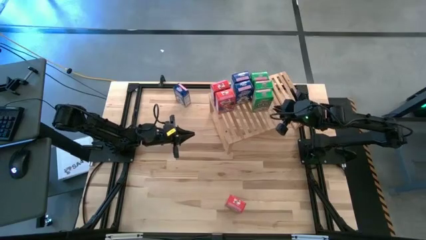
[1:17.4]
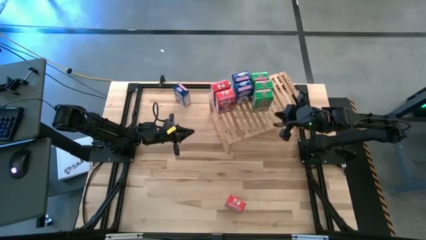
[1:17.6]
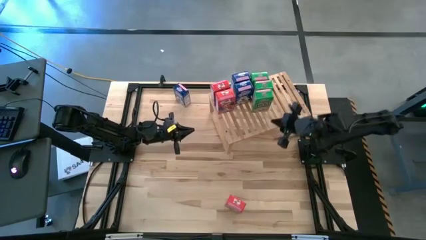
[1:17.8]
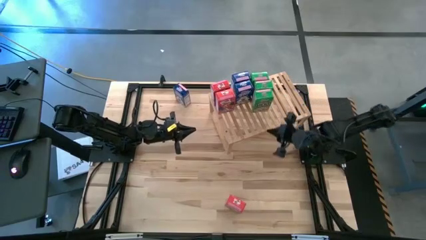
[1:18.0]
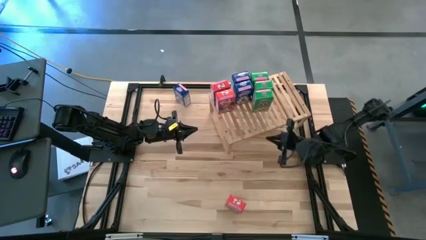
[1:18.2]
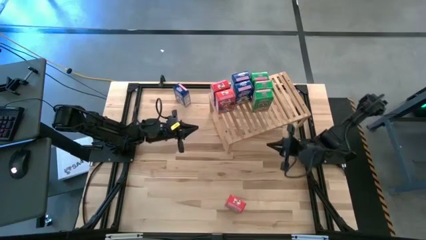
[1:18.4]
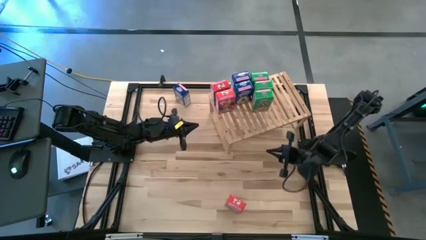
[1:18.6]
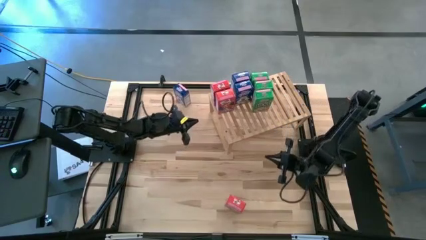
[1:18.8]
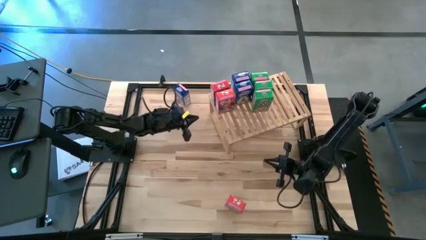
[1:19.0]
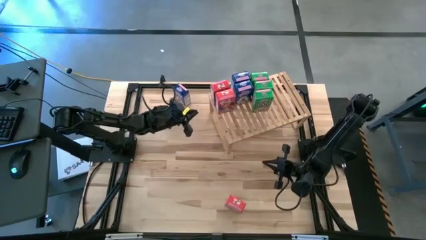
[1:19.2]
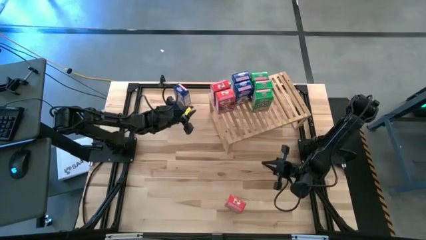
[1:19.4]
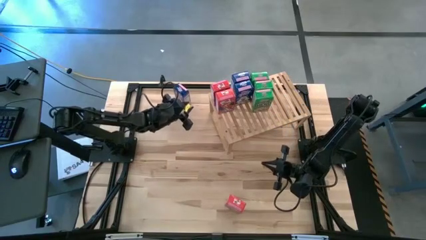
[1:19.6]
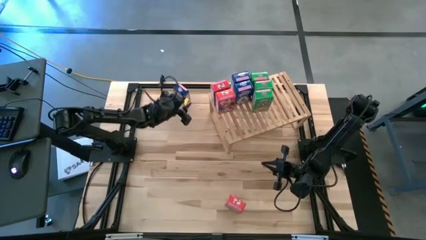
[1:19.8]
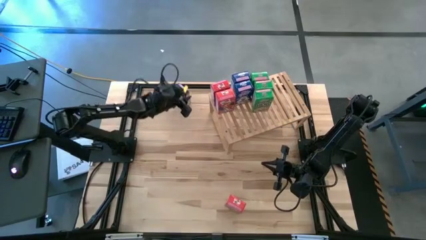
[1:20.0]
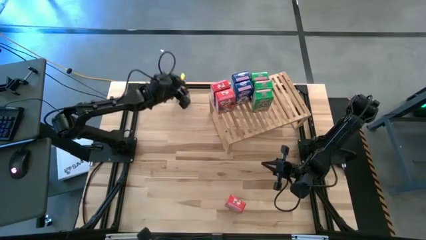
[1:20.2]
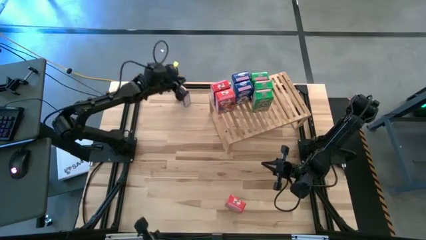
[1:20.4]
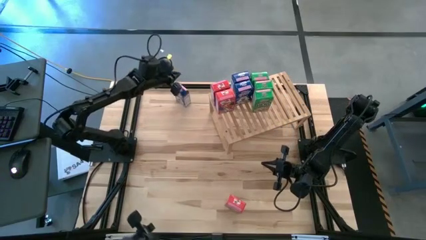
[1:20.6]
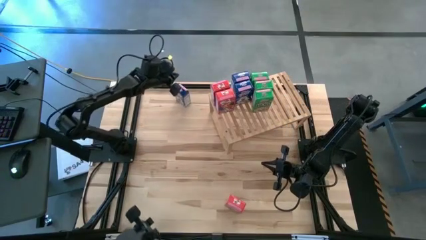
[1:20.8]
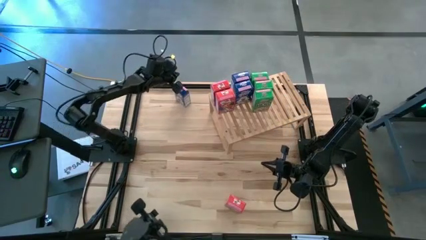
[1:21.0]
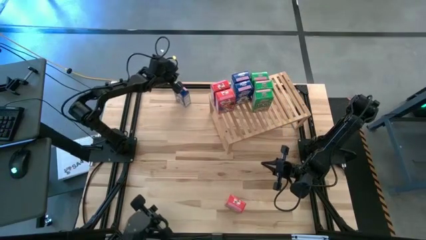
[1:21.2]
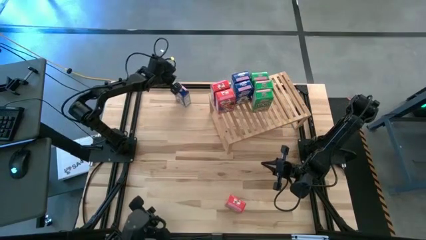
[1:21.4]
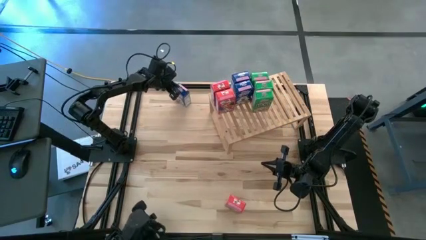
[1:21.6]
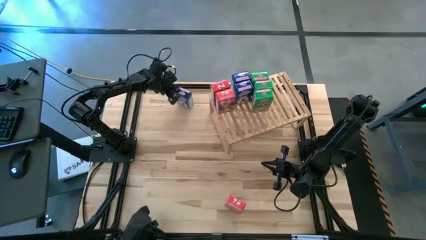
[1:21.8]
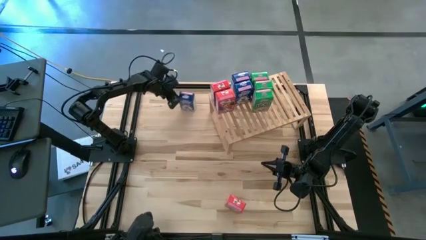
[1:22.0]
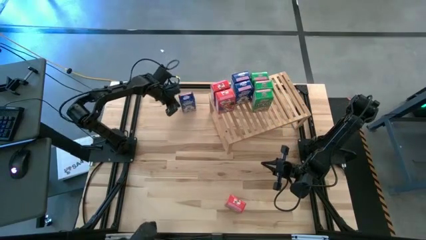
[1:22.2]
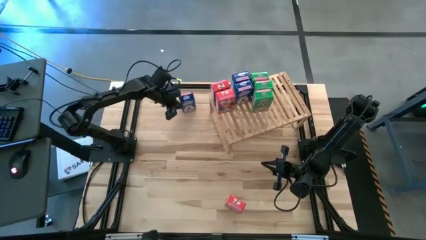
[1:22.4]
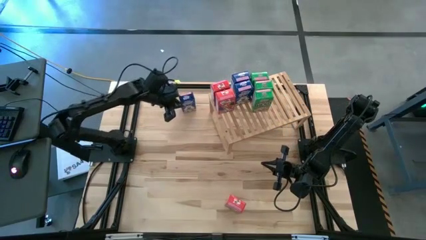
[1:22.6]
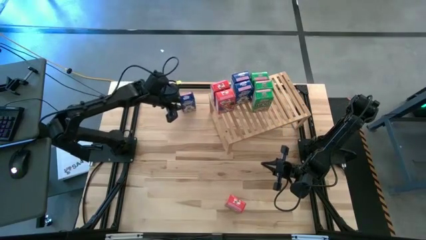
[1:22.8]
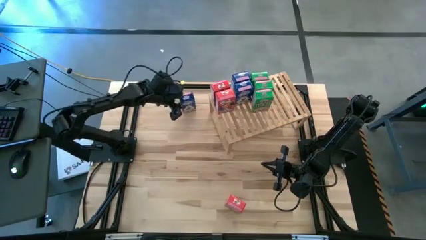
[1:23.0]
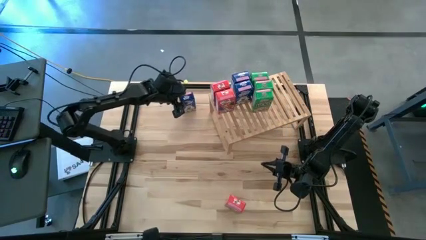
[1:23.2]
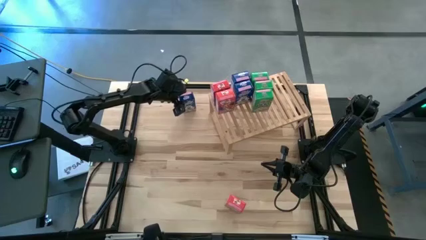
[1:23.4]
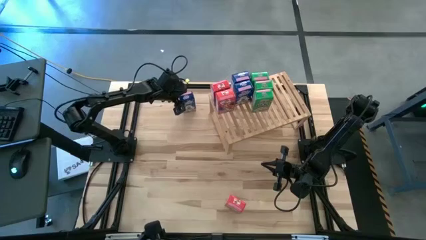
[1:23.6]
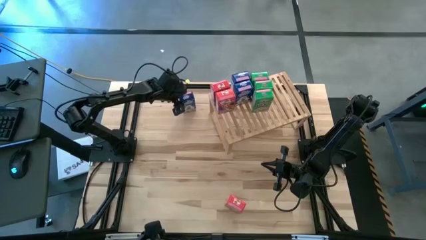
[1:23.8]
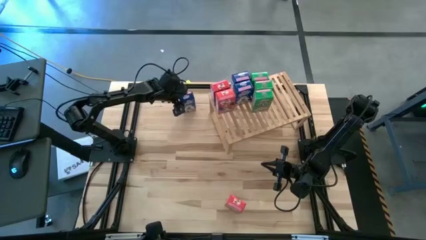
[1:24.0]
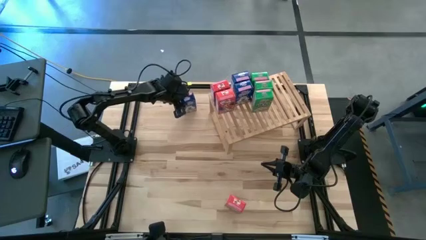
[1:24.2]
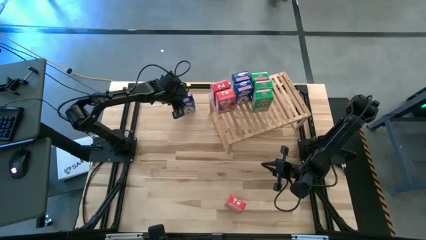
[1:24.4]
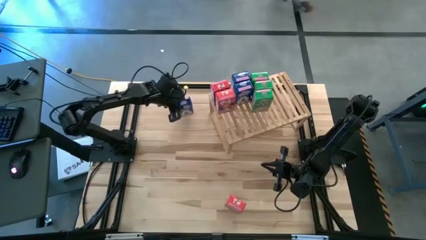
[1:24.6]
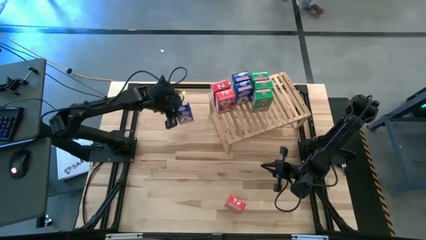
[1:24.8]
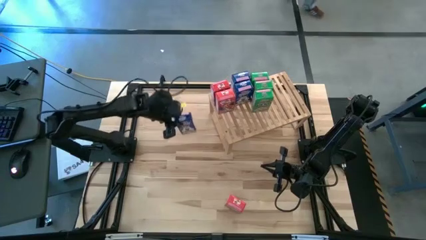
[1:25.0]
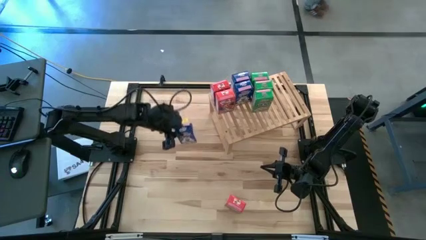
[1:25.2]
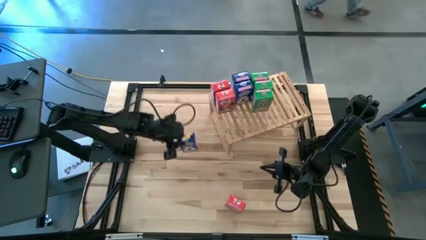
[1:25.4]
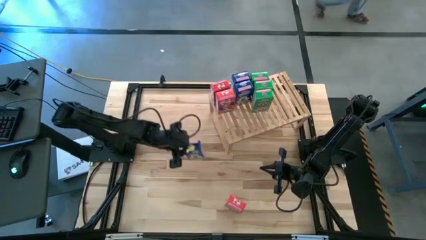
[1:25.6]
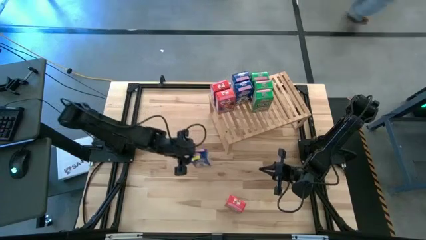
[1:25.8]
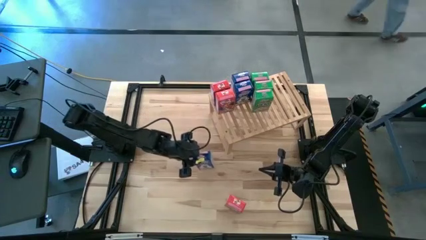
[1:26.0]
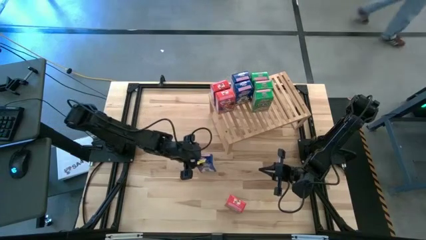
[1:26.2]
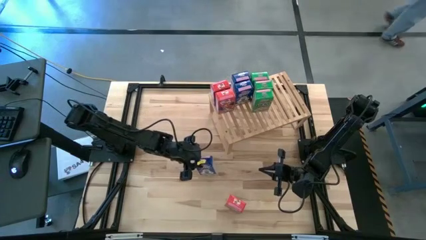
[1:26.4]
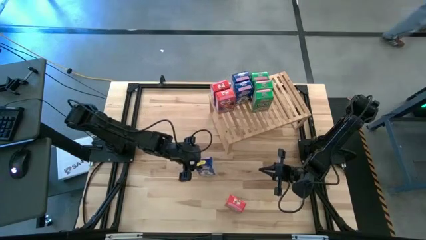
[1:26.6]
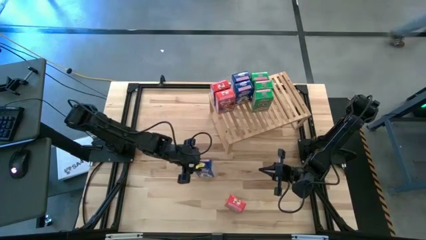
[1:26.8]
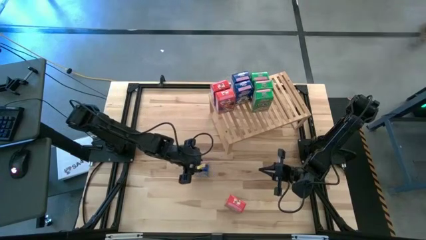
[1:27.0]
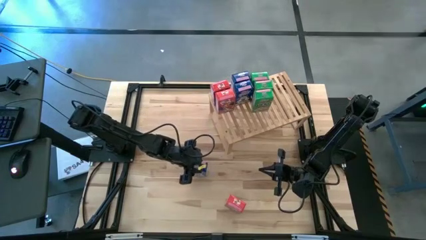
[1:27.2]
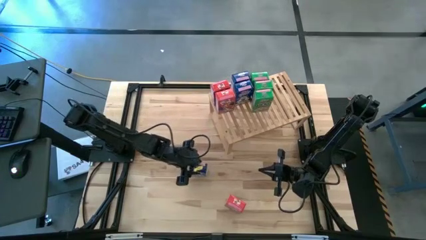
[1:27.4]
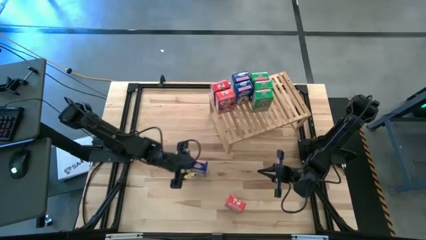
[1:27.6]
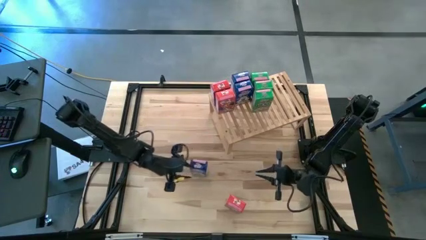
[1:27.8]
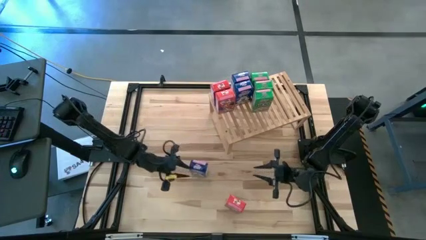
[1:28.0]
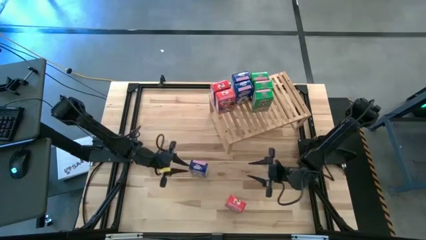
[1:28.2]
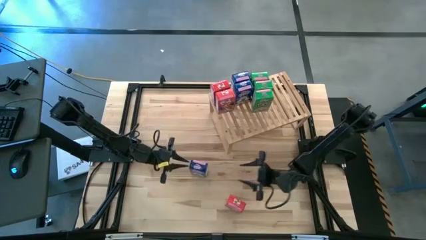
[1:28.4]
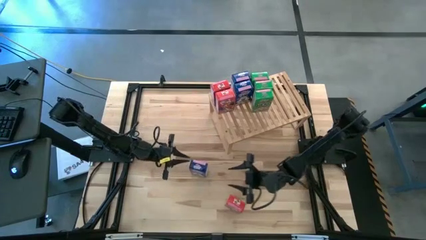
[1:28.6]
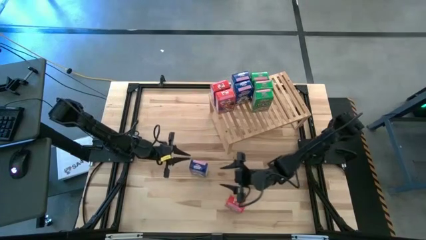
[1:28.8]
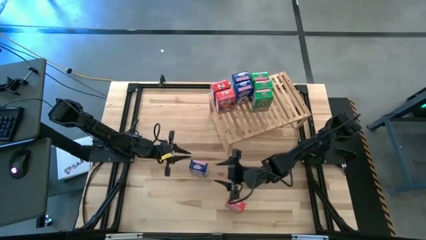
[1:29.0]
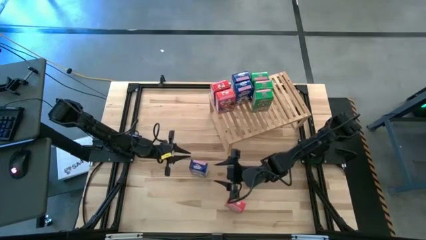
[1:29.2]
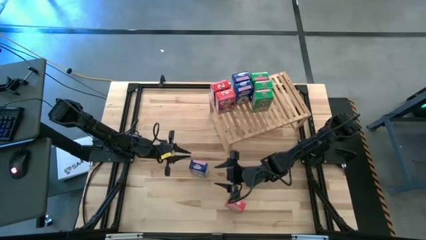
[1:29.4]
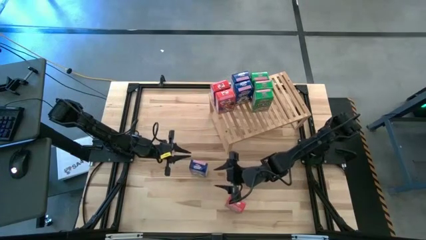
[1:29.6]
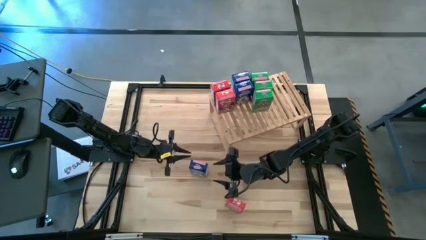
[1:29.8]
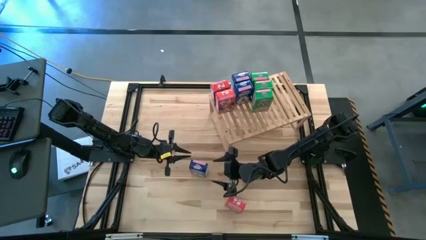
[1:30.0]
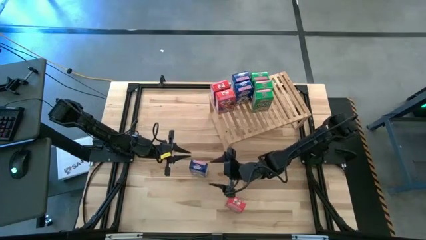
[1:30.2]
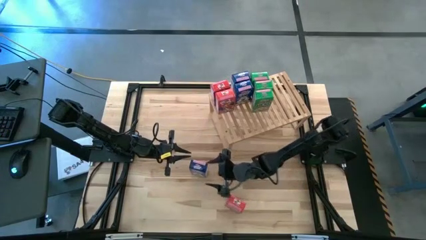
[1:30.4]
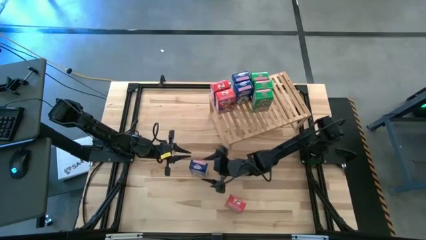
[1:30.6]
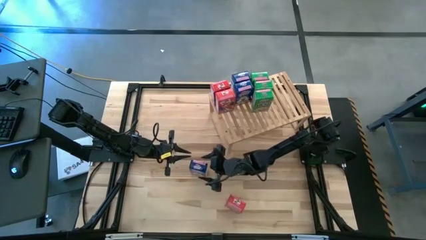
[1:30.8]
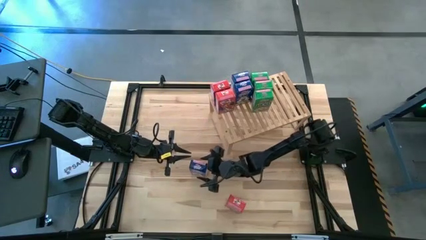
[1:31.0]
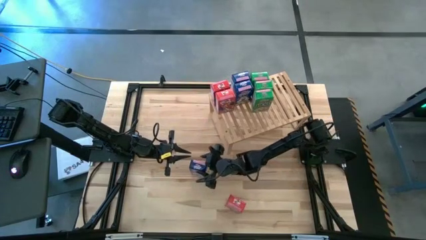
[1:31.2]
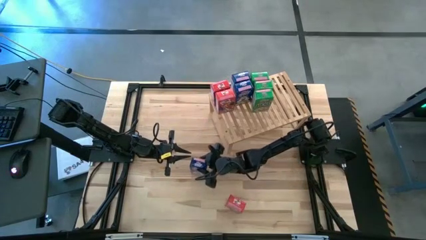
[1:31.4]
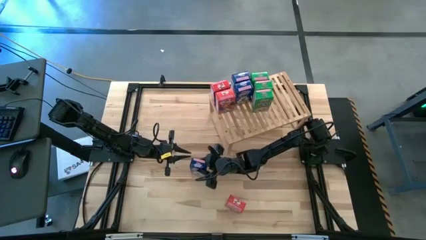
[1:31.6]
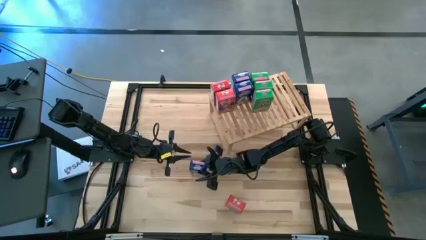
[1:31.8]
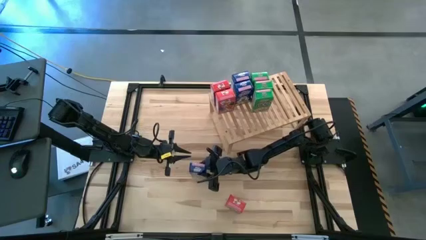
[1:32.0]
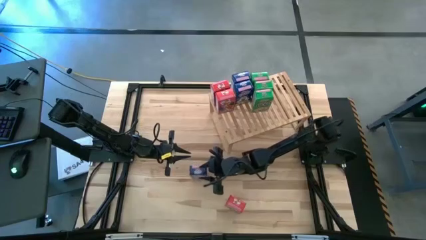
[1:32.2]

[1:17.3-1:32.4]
Task: Stack cereal on shelf
Put the blue cereal box on the shelf aligned with the other blue cereal boxes

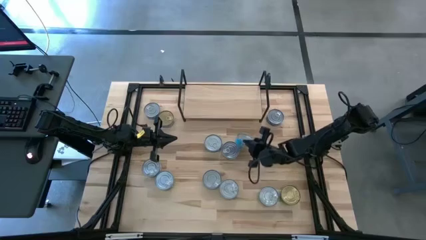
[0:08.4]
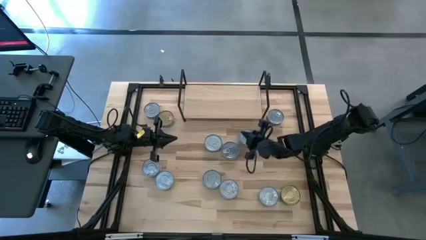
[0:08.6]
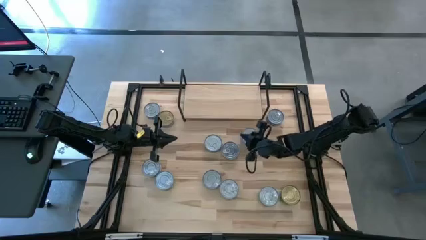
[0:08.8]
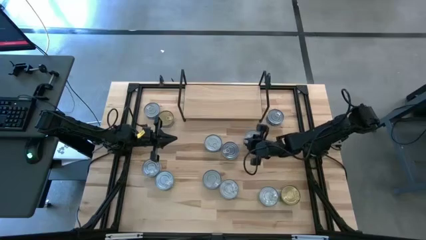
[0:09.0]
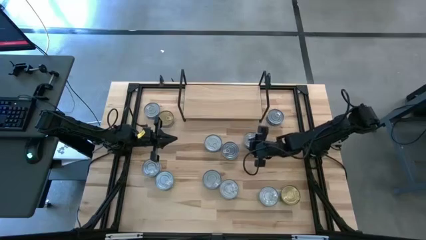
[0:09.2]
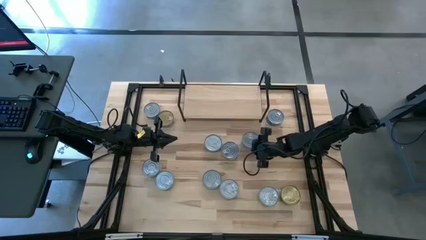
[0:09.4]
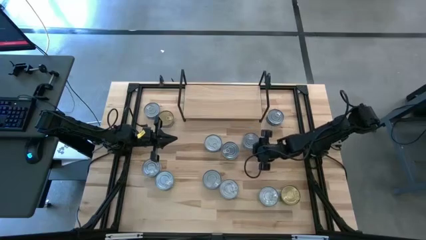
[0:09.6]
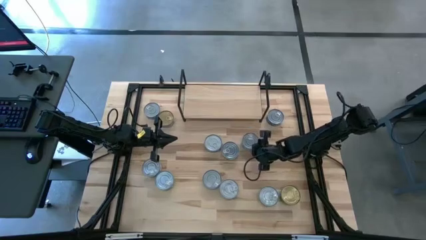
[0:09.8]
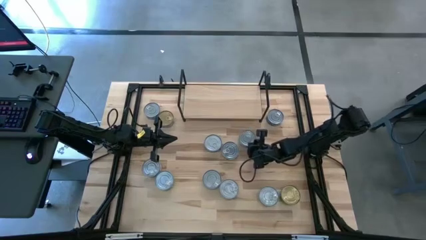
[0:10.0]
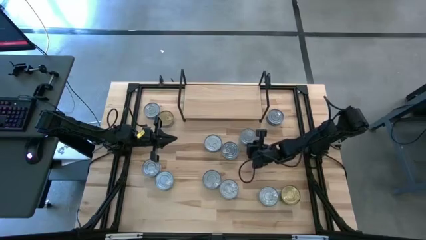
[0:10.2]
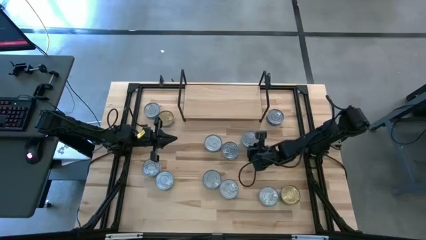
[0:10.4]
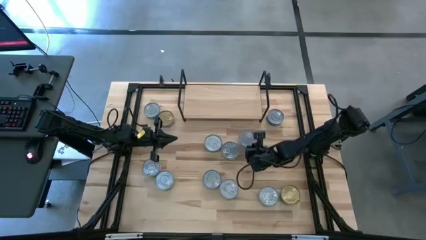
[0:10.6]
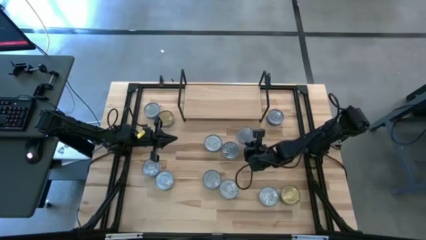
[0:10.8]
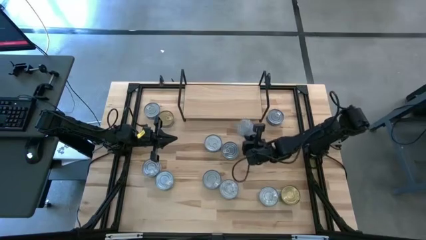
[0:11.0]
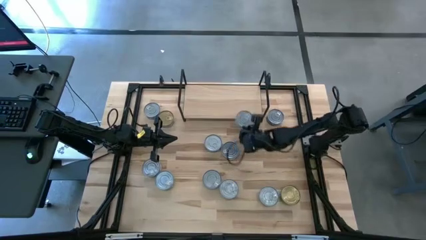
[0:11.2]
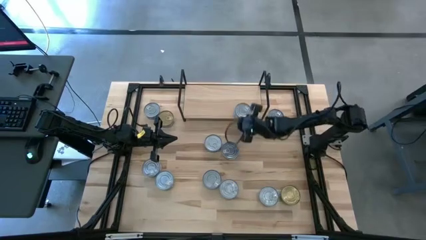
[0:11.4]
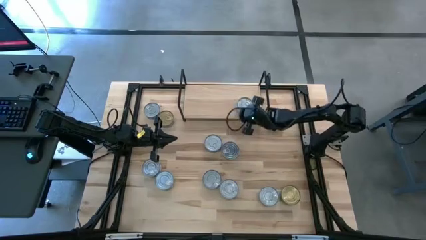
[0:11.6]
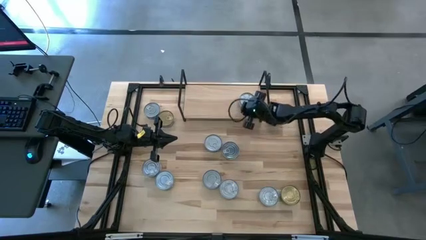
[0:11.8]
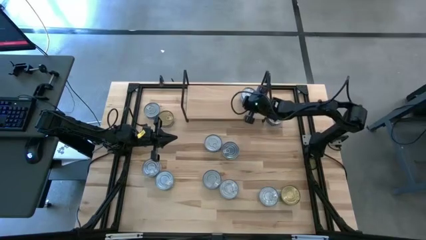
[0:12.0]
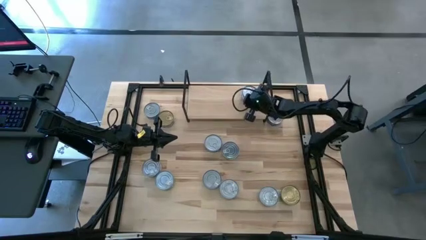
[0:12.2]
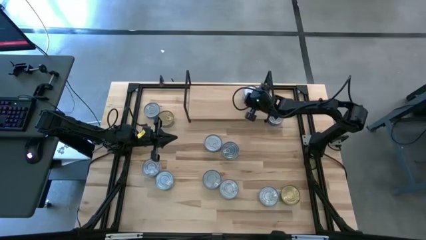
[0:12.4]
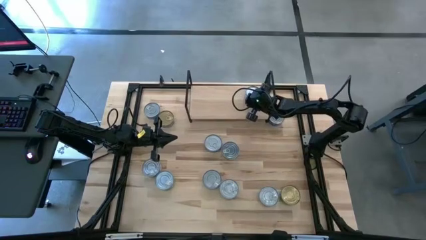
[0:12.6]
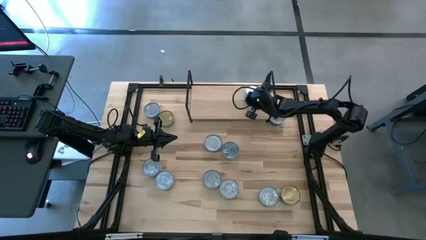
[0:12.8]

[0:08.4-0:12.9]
Task: Stack canned seafood by type on shelf
Put the yellow-blue tuna can on the shelf
